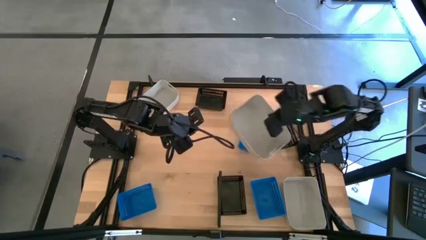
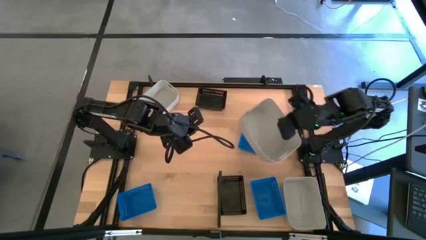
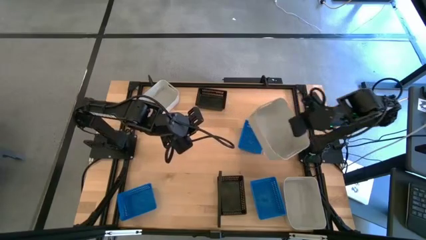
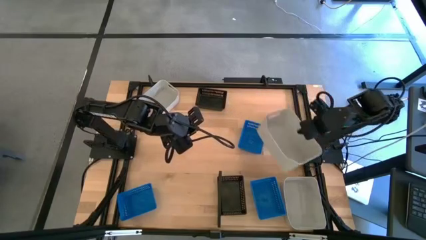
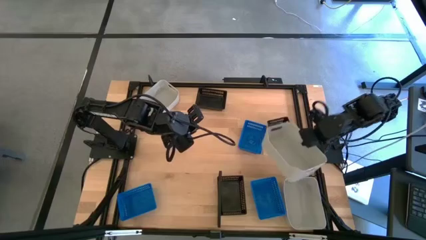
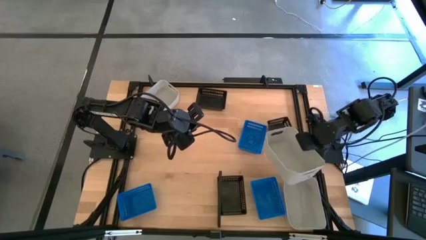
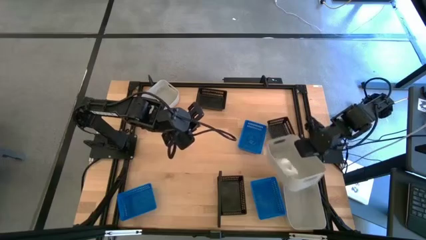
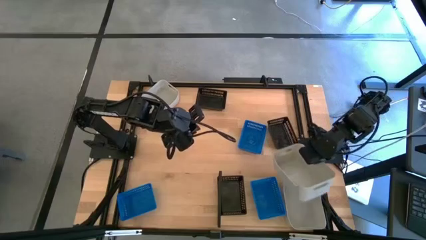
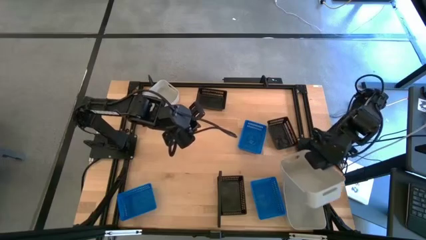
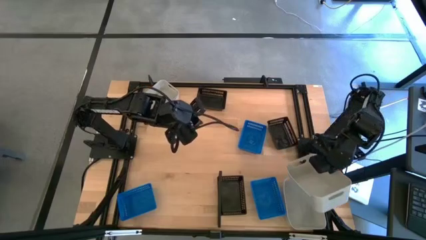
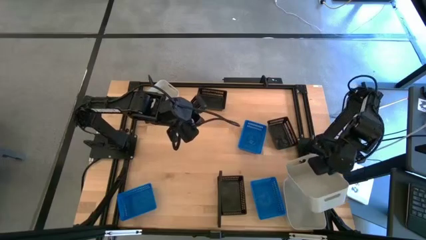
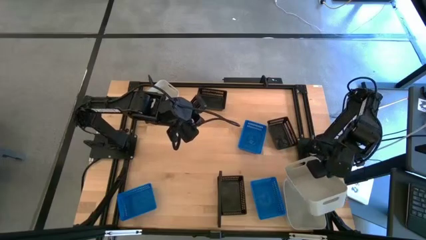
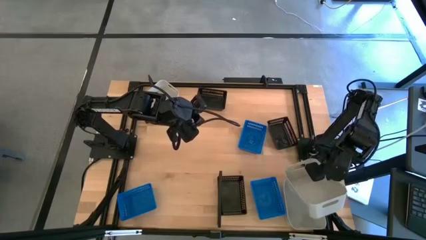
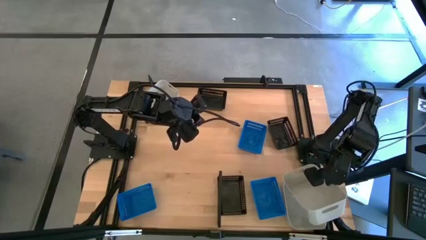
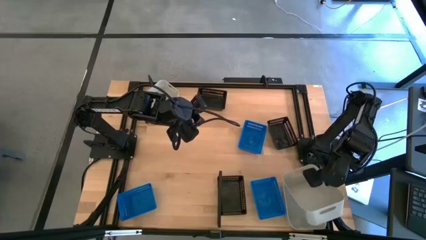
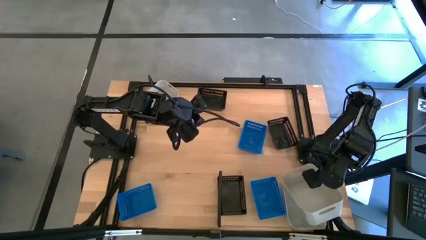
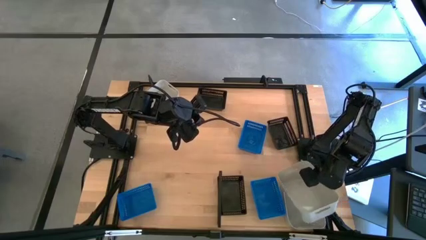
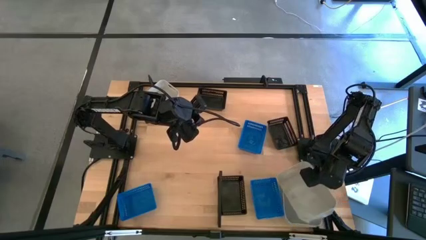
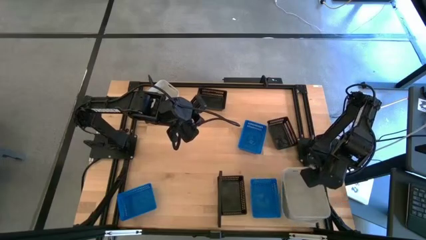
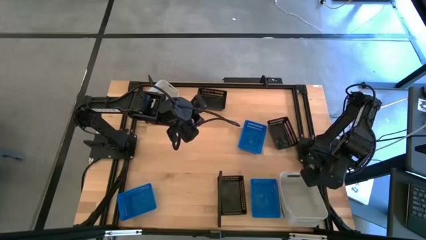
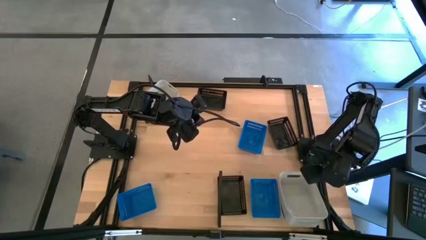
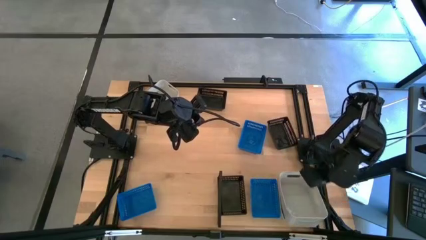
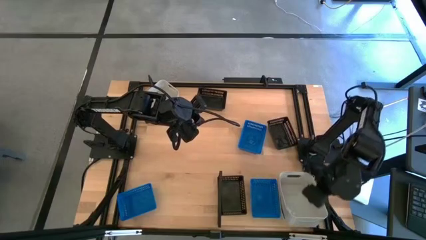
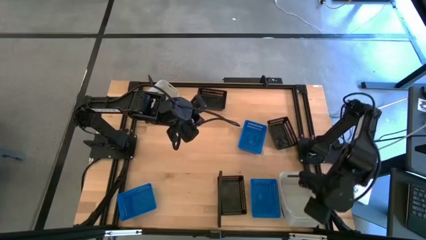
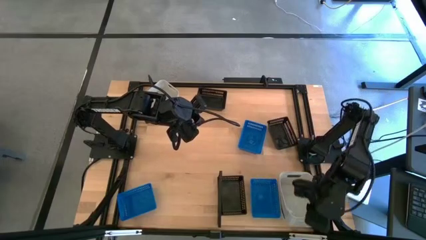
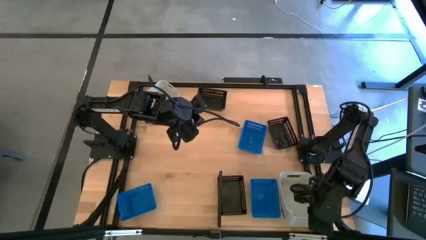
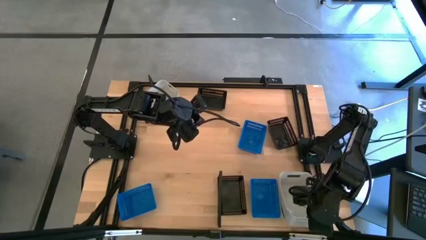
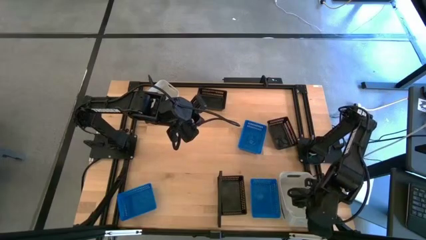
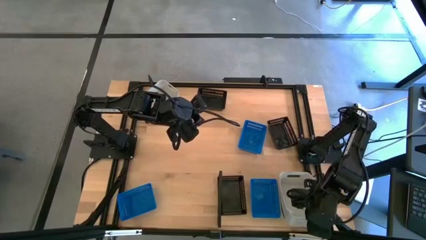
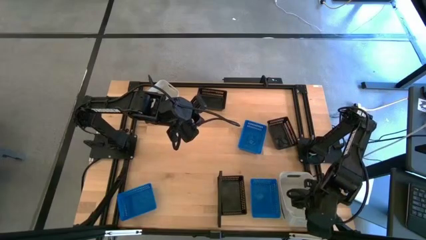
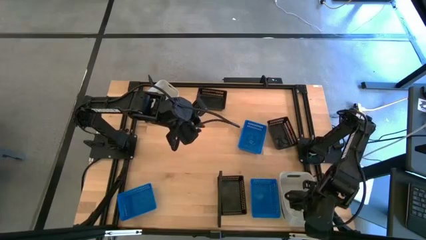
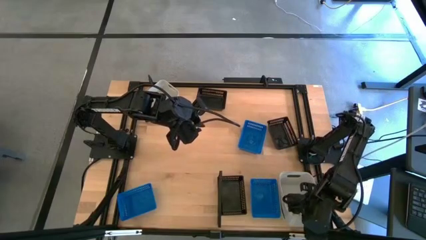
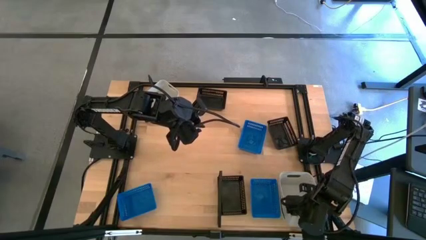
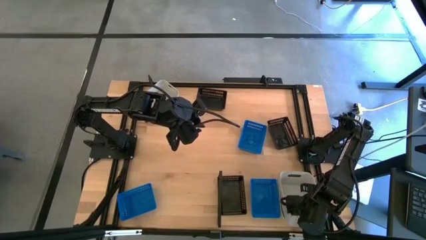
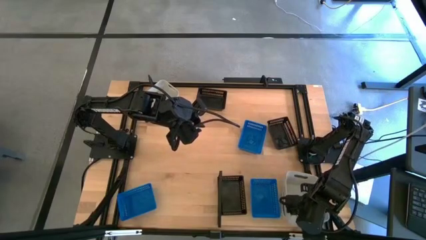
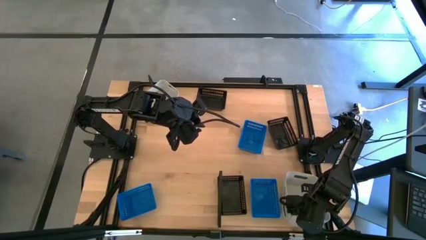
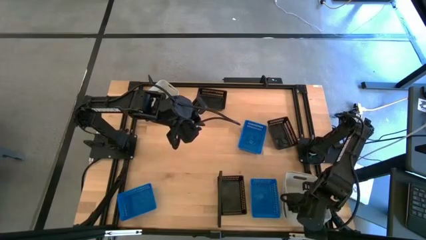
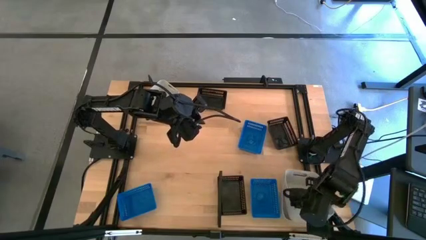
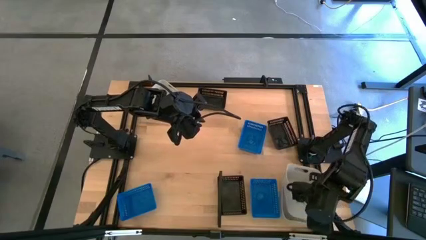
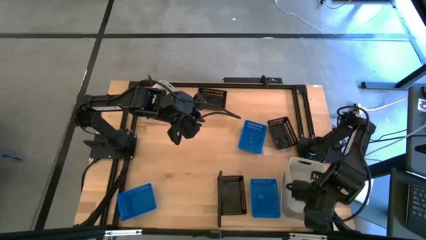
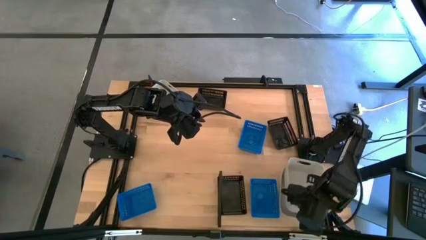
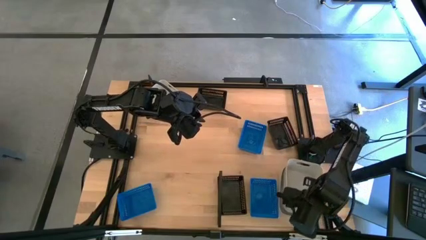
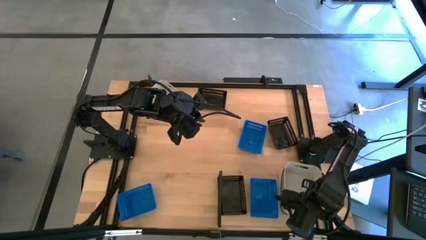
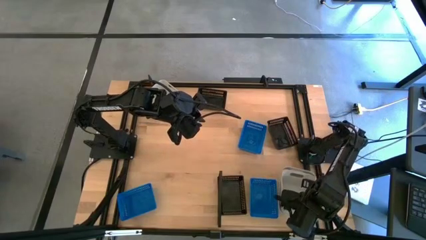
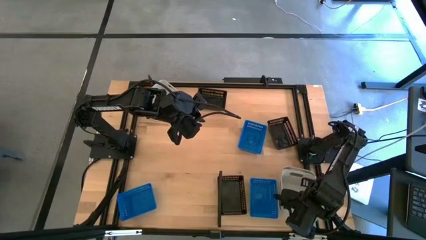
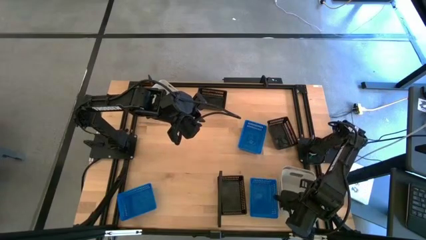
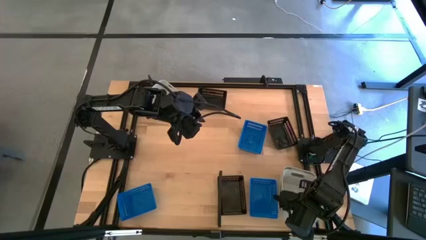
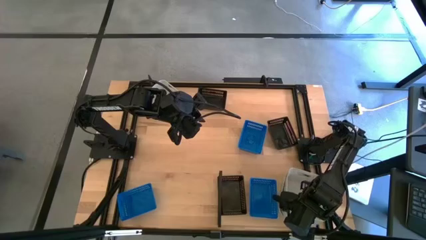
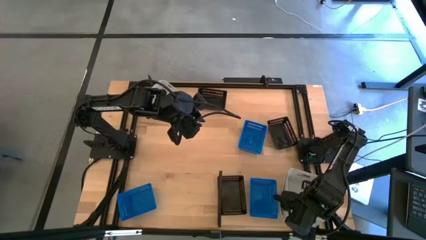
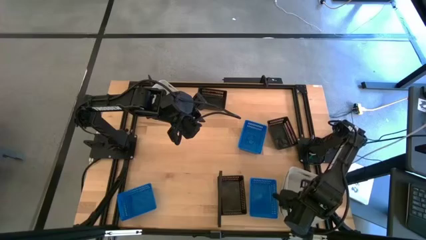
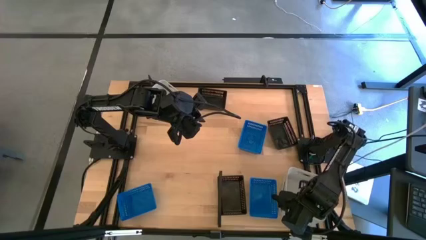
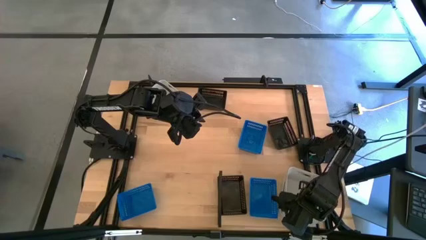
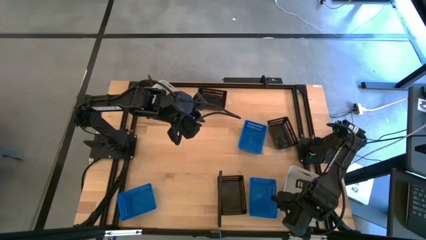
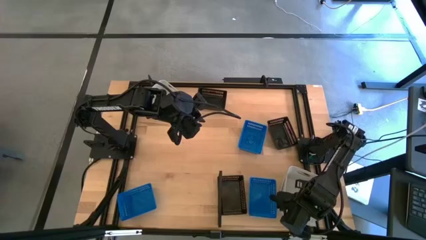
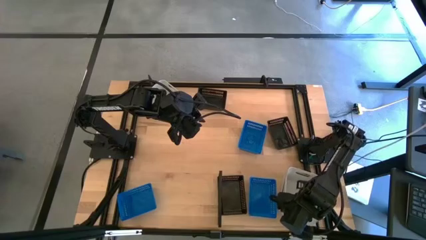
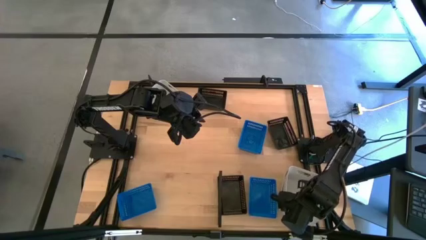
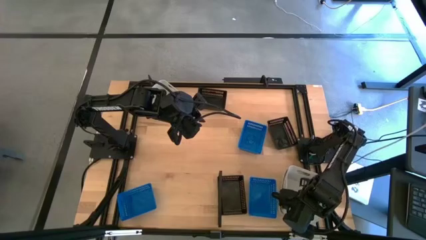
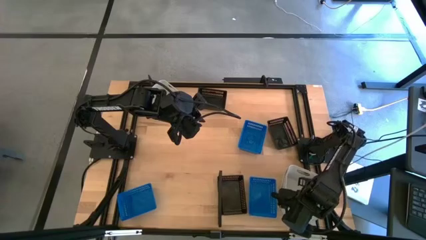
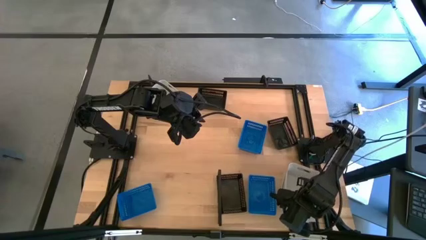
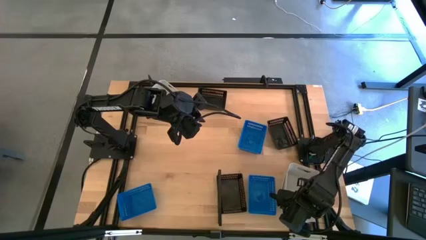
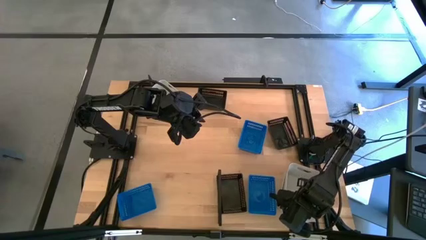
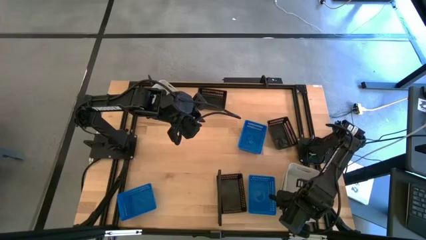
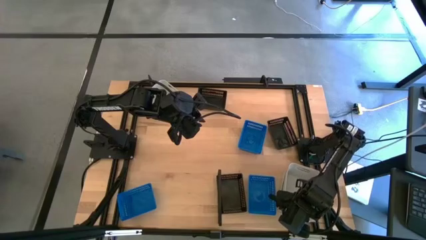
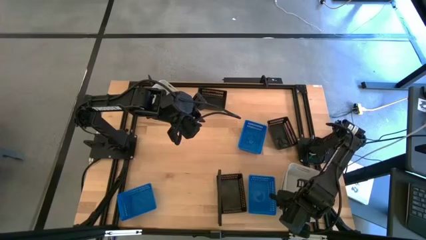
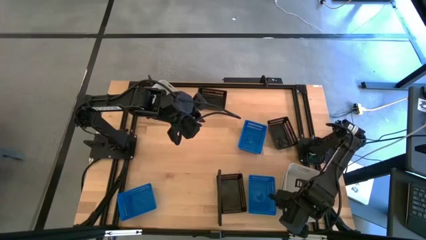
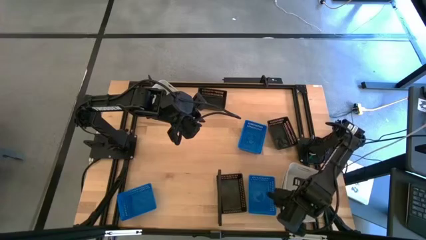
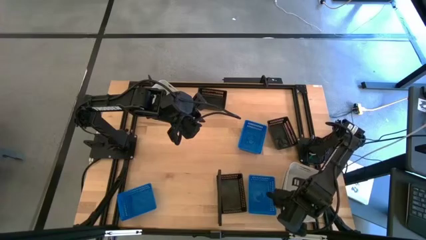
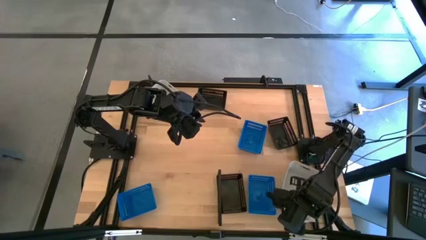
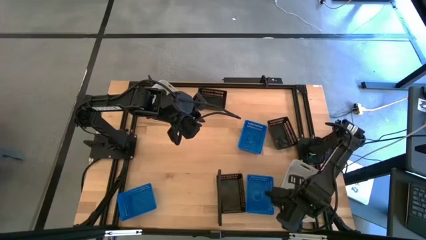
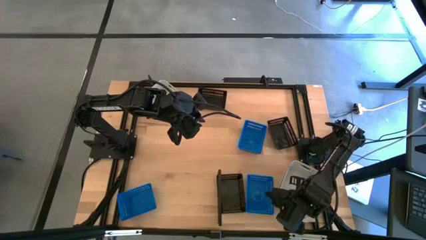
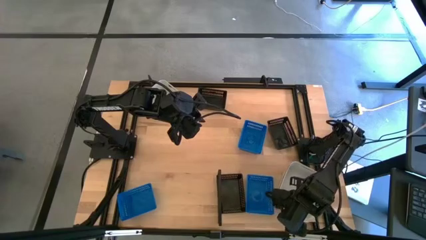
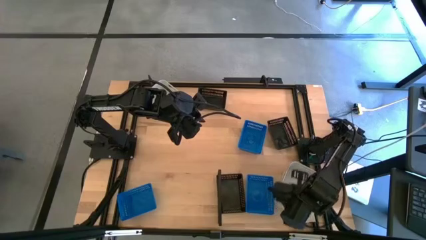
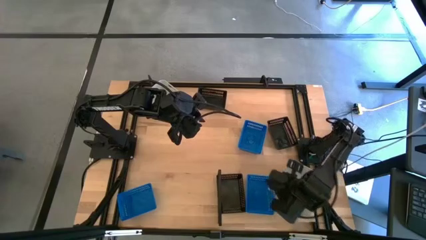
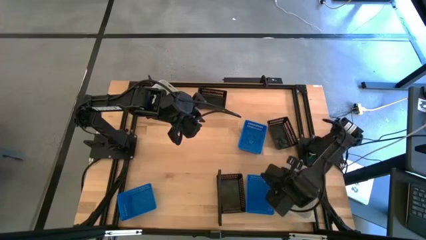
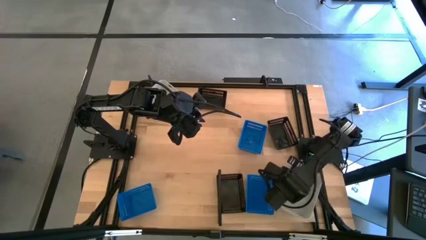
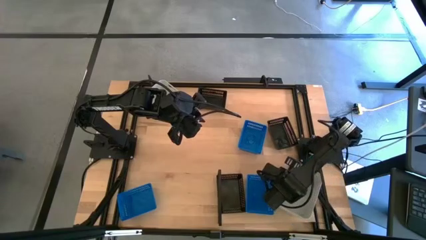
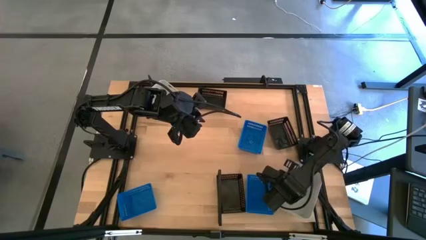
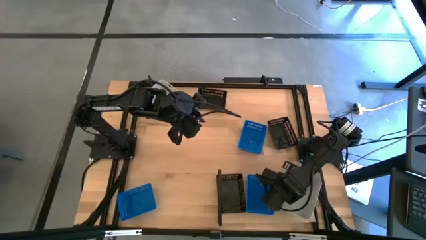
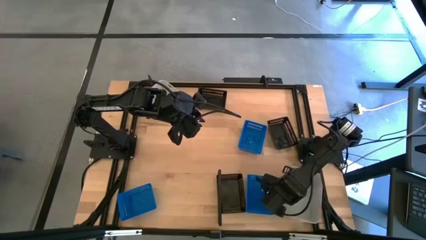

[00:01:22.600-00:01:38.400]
Task: Stack baskets on shelf by color
Stack the bottom gray bin on top of the gray bin on the shelf
